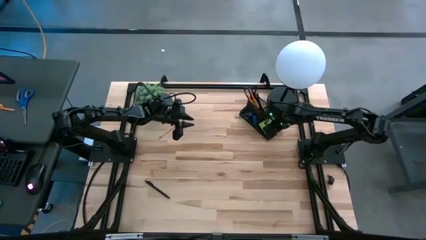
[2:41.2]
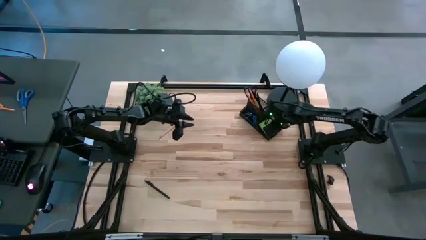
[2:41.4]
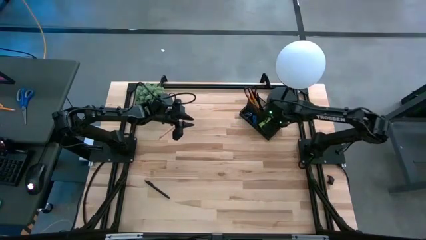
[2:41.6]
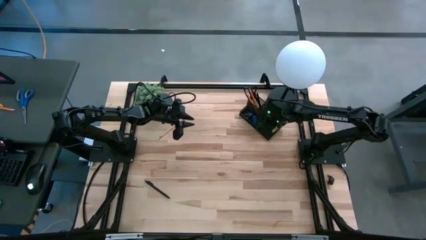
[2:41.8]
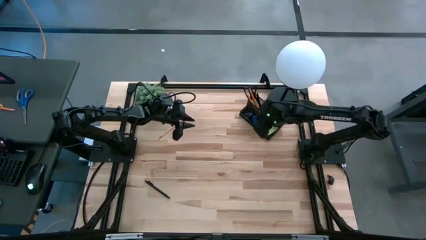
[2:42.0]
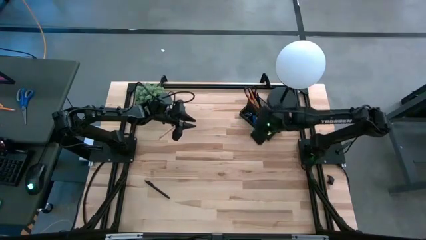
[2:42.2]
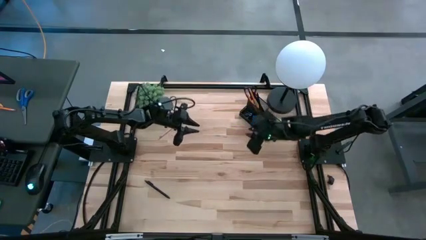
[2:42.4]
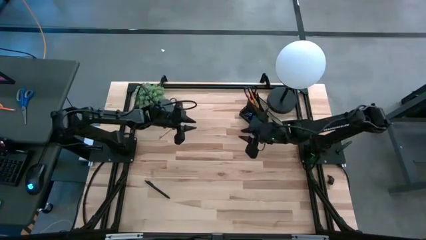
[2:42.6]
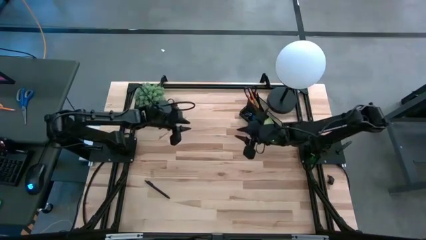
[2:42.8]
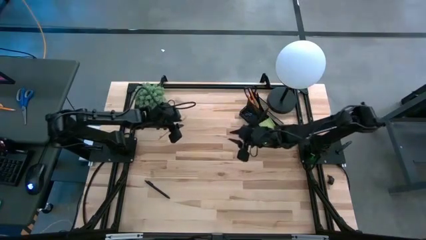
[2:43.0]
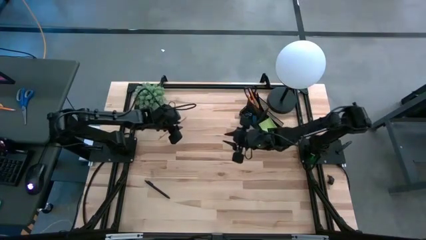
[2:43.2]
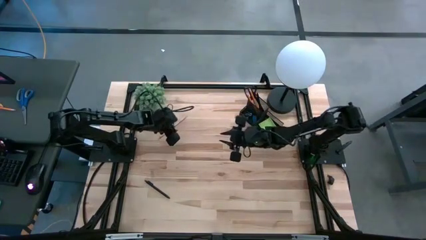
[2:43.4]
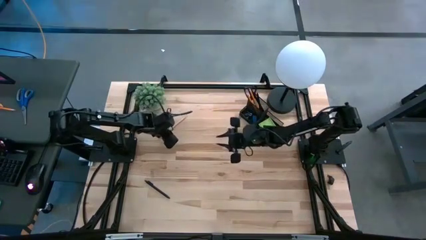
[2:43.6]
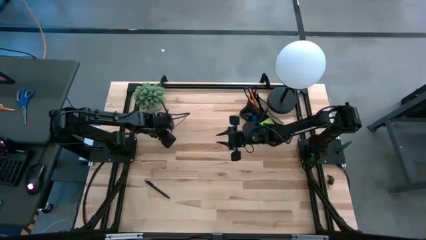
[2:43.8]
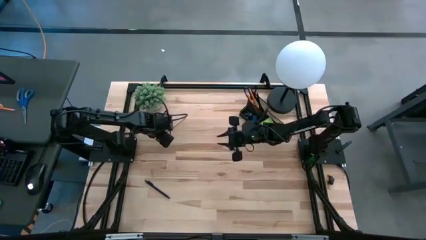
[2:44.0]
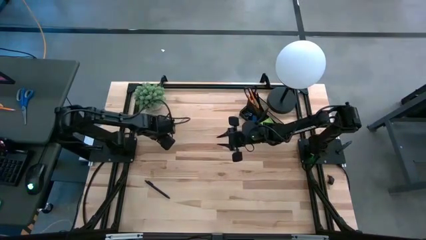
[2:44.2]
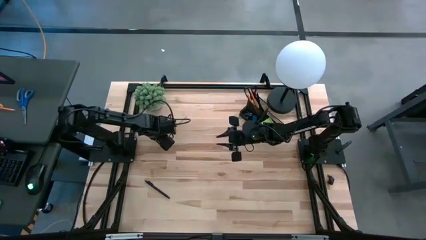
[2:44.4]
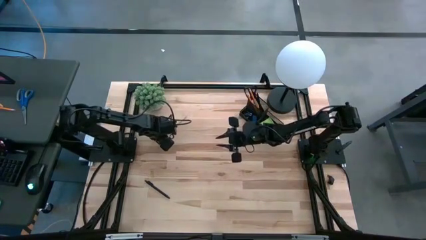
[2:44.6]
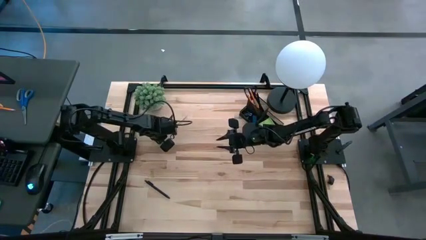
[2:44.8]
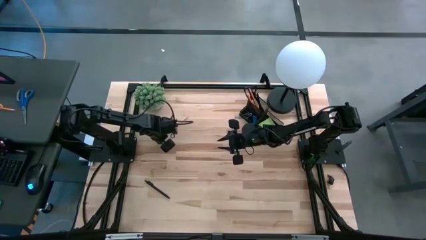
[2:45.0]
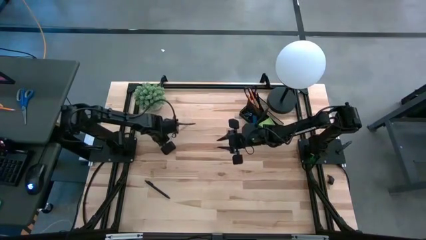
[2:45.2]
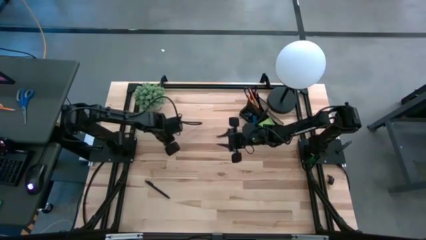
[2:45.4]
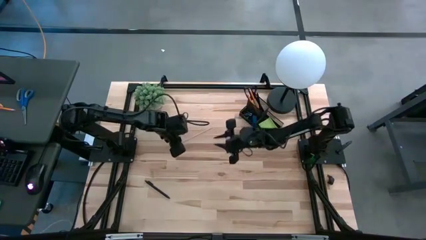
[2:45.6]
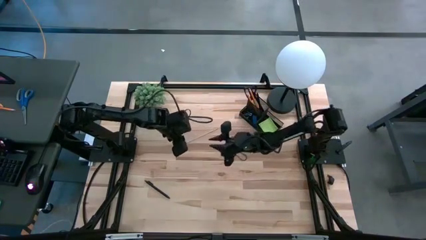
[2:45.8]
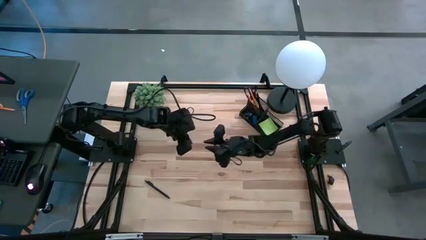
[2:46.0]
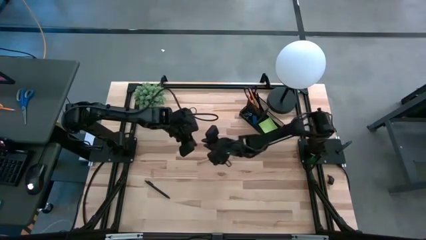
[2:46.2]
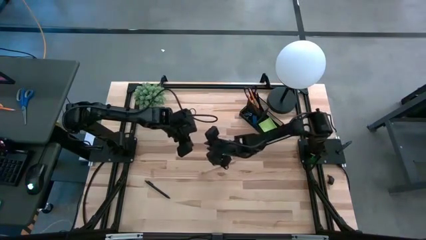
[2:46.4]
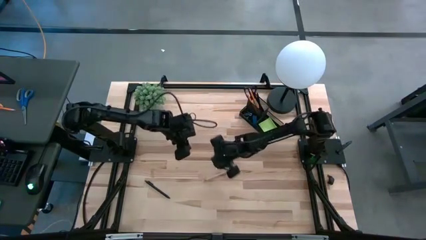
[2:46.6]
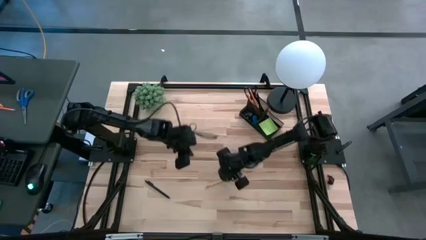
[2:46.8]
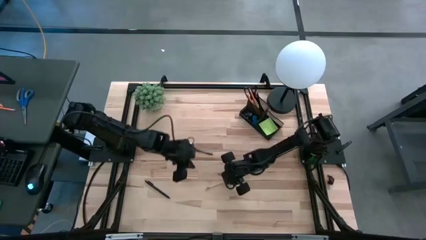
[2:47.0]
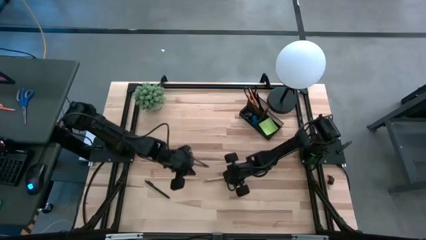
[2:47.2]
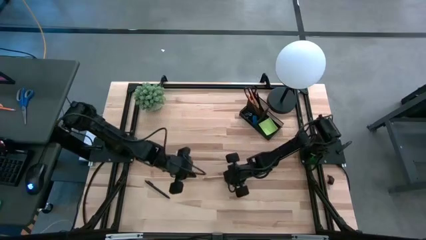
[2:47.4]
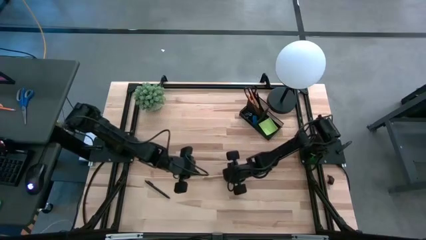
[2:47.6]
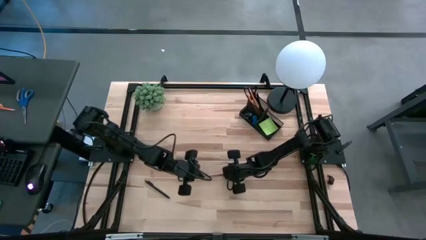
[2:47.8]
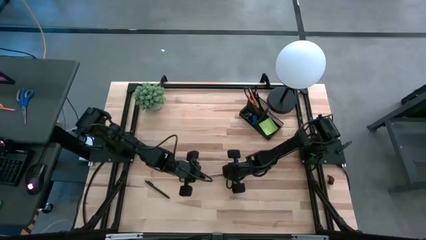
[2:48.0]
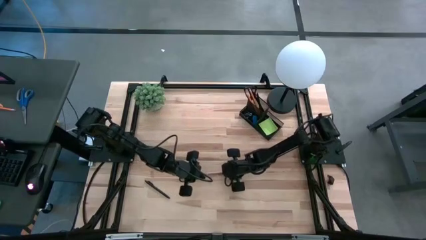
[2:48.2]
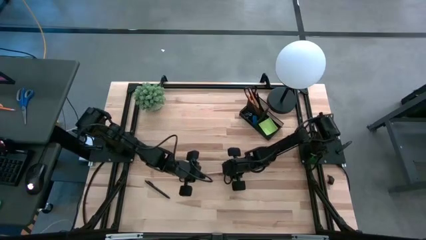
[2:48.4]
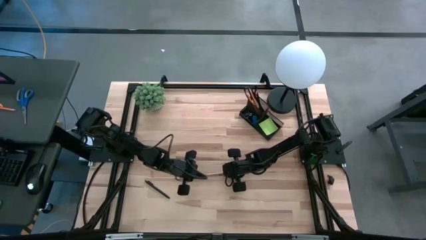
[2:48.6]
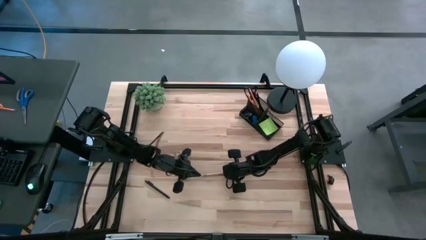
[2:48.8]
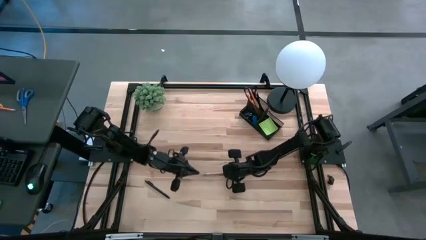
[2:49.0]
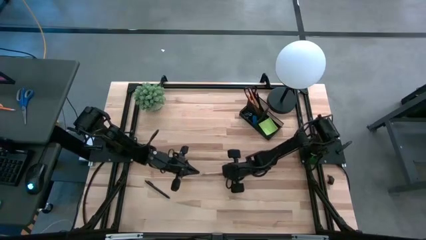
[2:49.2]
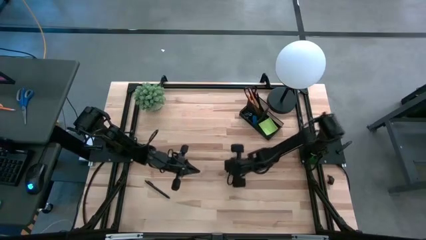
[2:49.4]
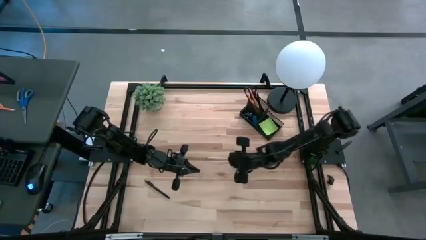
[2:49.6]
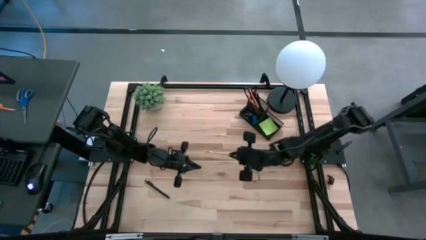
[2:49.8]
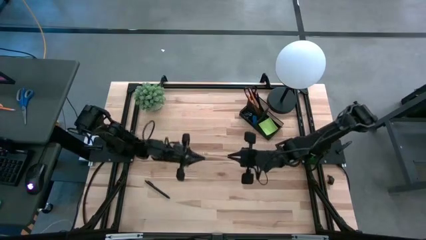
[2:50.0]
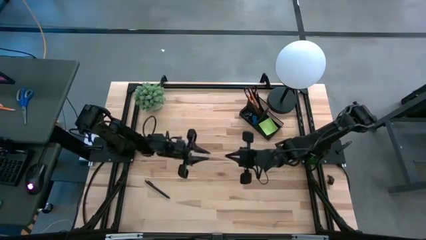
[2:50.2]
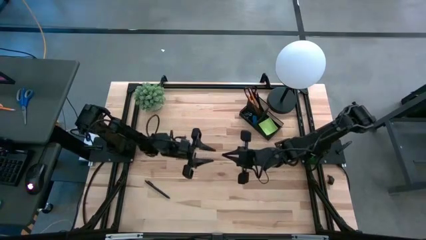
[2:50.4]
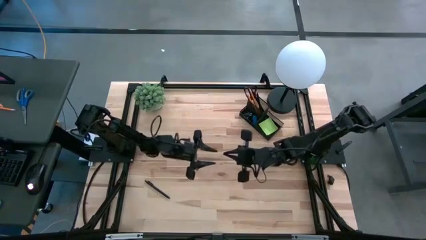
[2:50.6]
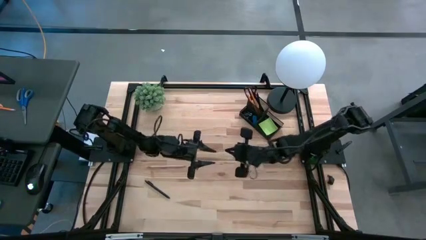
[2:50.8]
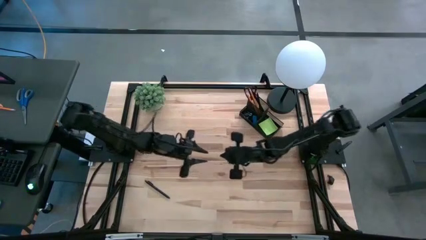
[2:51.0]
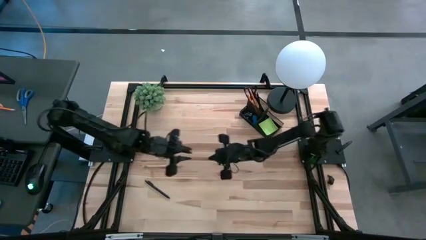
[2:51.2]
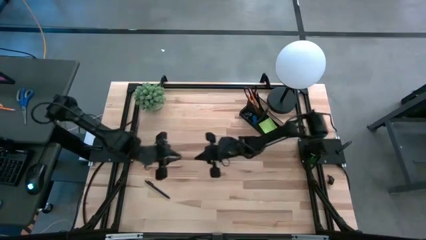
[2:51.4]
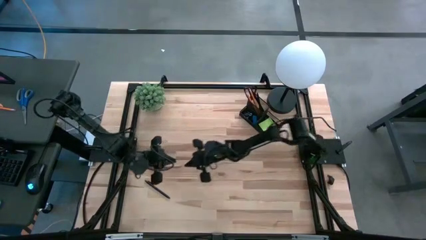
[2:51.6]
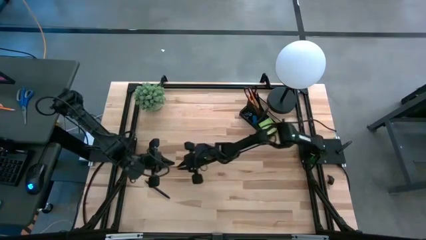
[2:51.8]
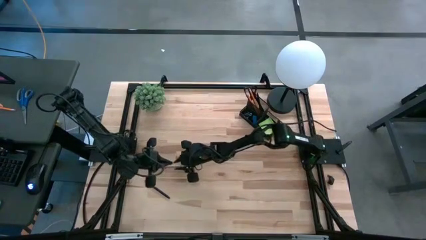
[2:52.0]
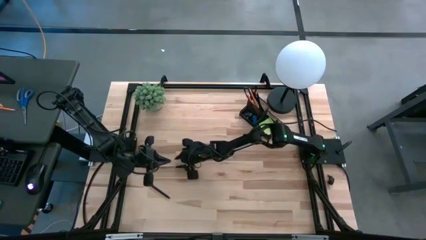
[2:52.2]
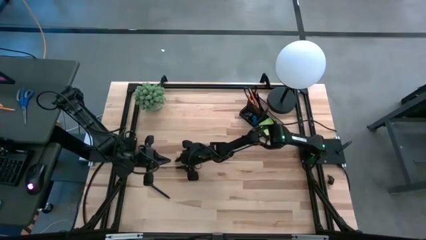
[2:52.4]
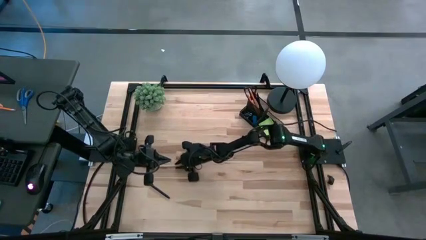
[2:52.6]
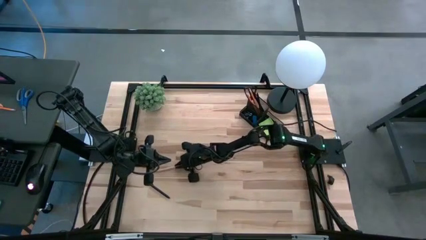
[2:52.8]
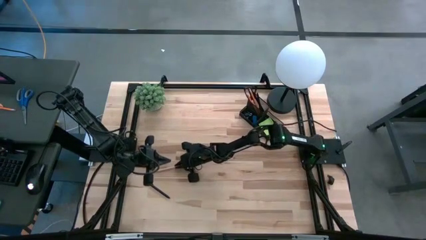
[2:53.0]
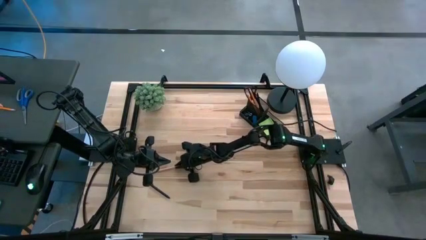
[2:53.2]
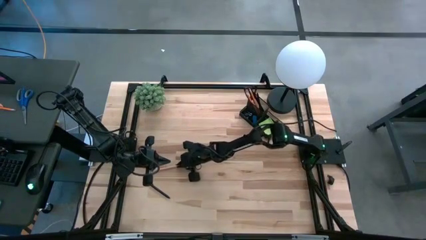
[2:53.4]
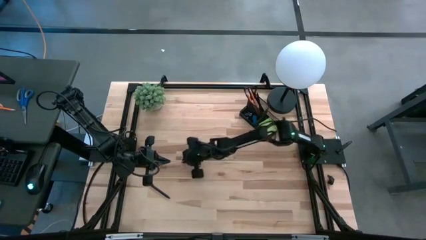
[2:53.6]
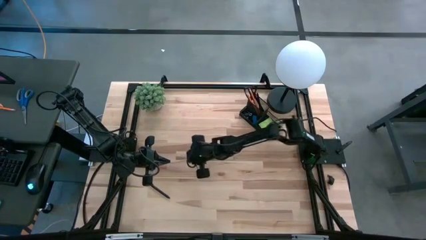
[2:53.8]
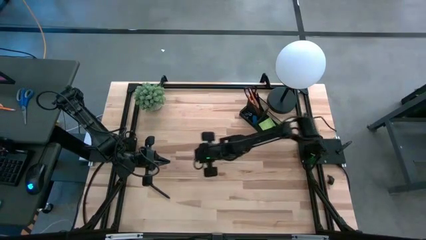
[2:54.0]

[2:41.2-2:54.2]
Task: Pick and place office supplies into organizer
Put the pink pencil into the black desk organizer

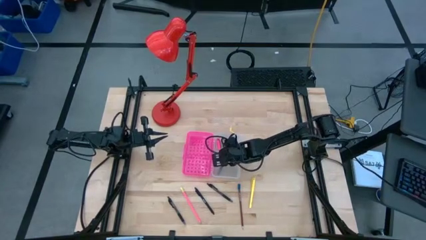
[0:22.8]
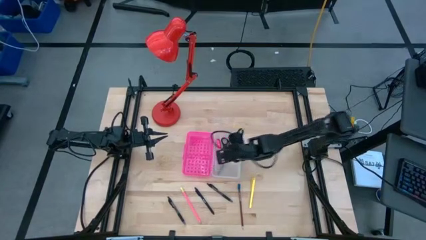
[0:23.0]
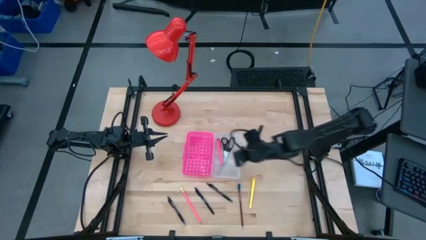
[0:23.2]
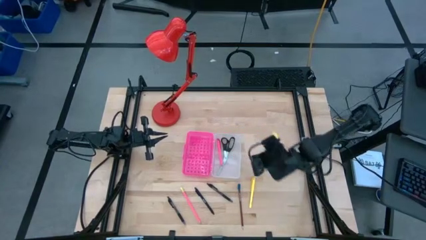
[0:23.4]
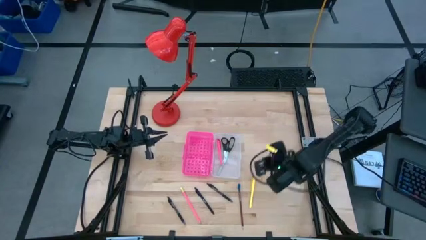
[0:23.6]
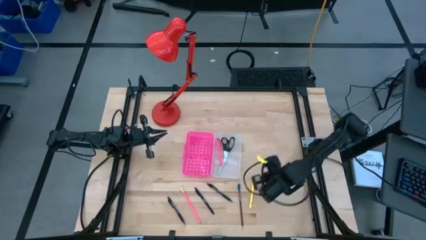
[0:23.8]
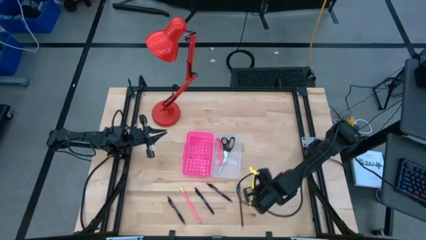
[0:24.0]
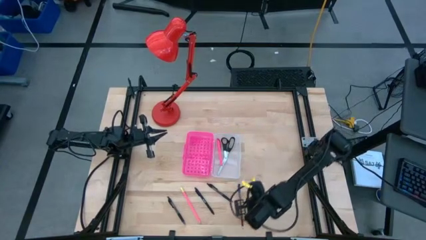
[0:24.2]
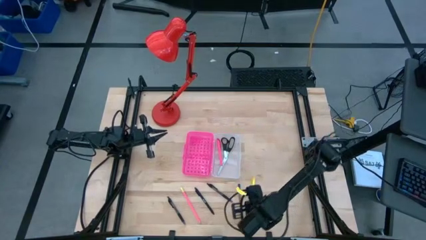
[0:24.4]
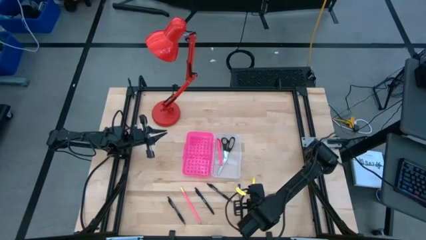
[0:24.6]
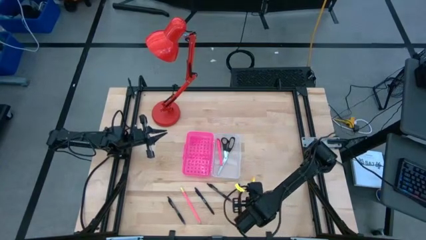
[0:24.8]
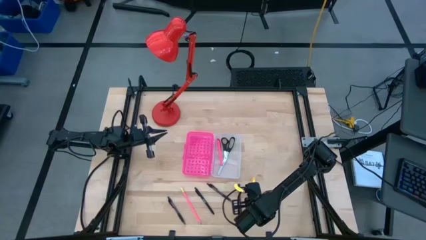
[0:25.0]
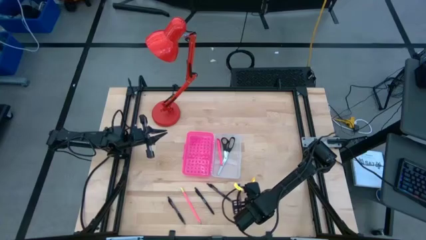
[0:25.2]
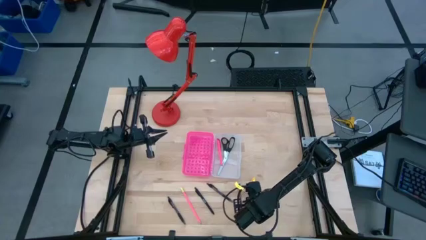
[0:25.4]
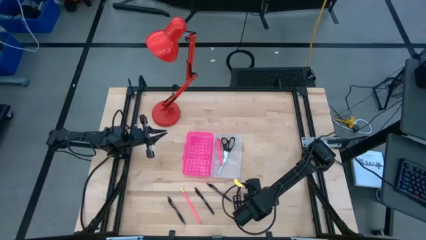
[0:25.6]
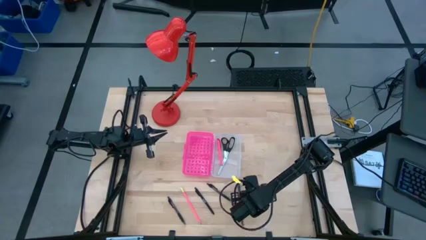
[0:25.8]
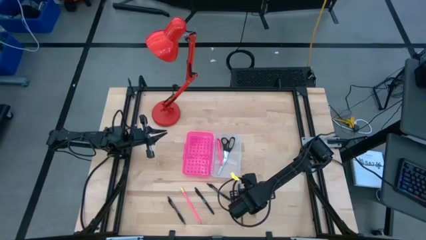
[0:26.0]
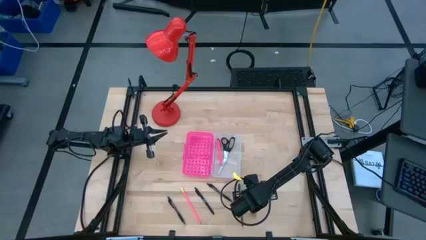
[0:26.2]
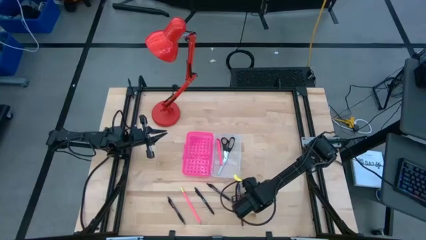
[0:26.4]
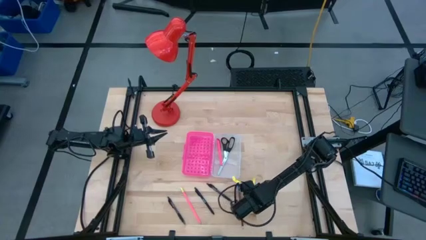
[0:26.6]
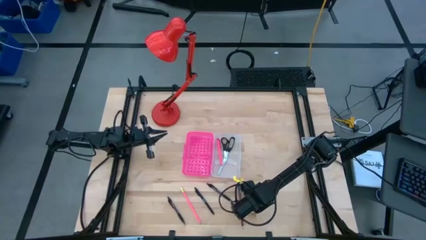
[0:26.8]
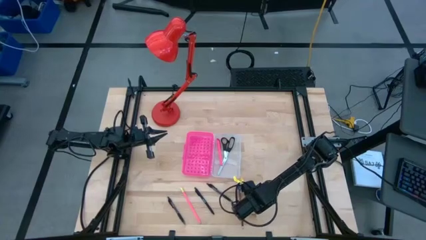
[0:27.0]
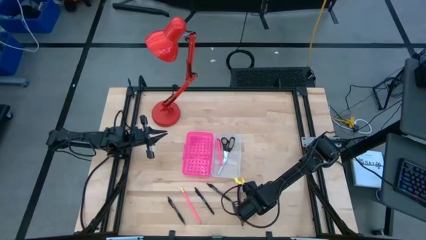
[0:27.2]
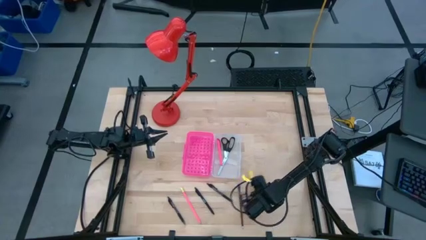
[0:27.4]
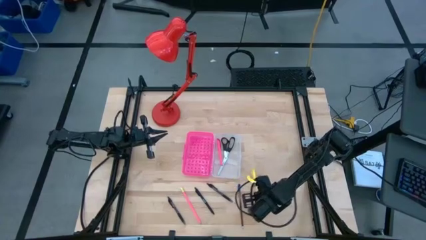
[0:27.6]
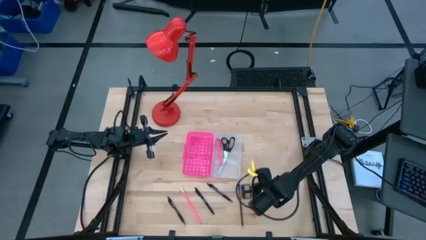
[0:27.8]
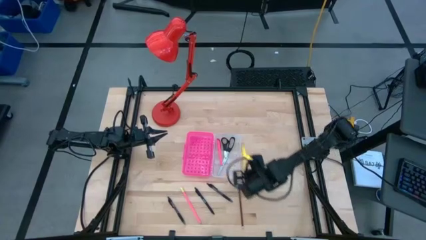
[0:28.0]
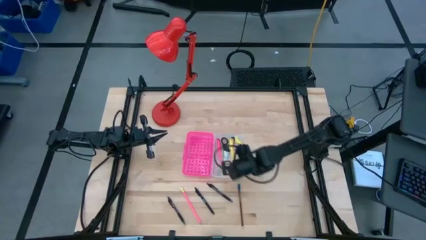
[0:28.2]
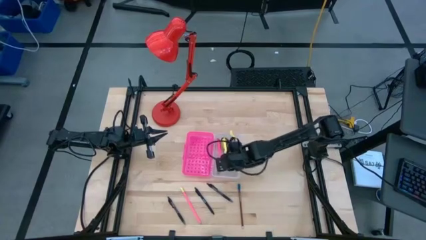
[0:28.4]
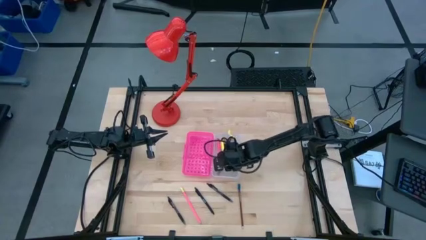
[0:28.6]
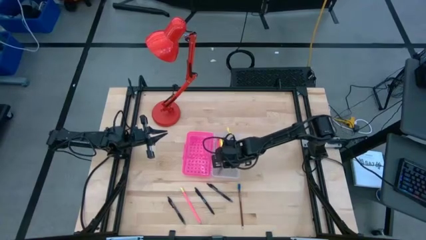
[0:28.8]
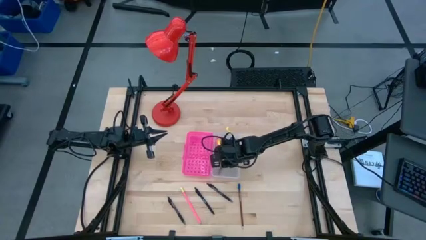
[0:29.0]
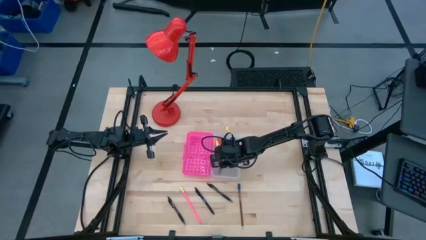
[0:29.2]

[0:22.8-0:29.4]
Task: Pick & place school supplies into a supply box
Put the yellow pen into the pink supply box
